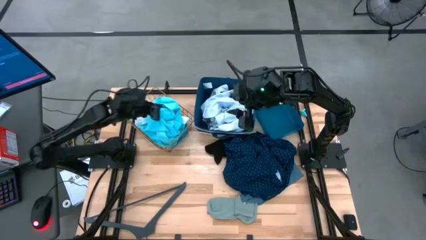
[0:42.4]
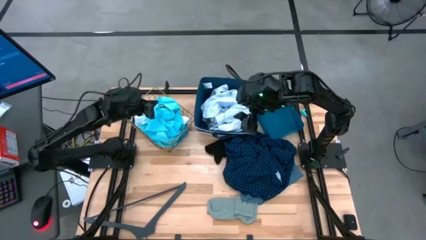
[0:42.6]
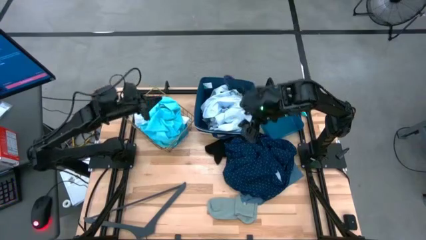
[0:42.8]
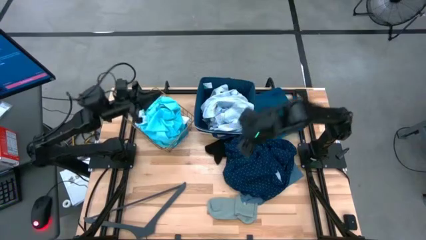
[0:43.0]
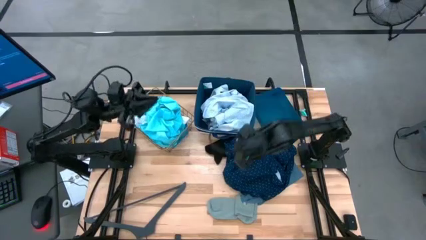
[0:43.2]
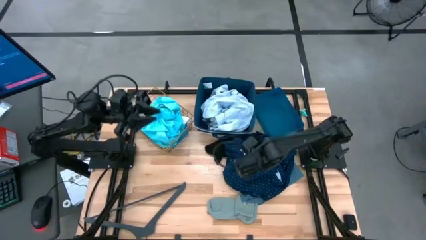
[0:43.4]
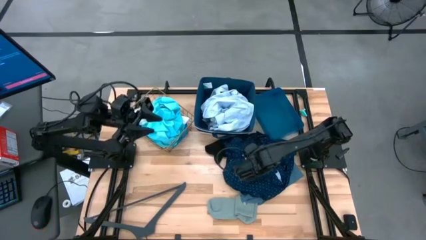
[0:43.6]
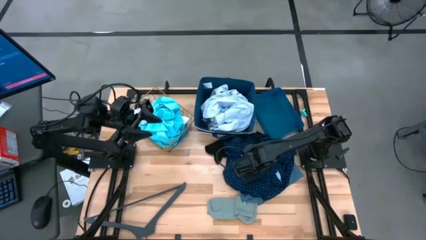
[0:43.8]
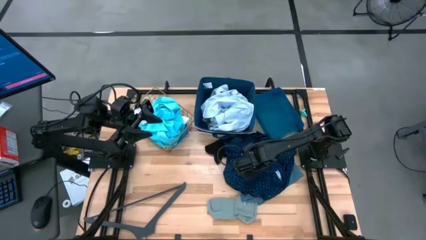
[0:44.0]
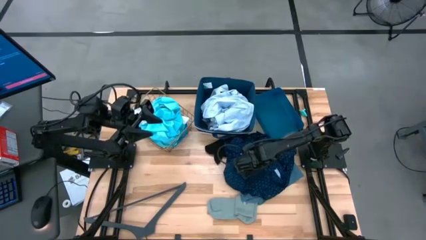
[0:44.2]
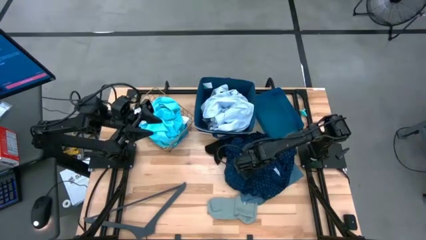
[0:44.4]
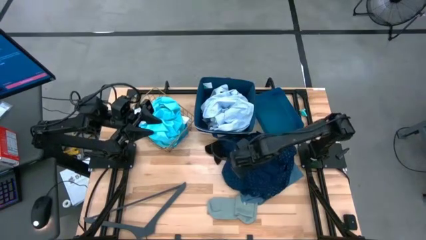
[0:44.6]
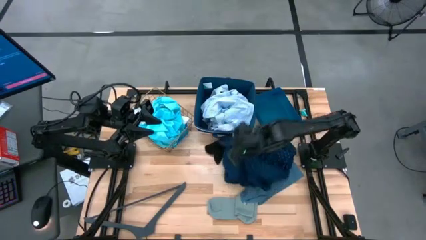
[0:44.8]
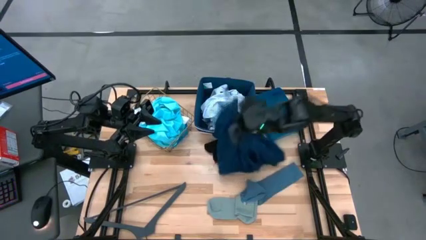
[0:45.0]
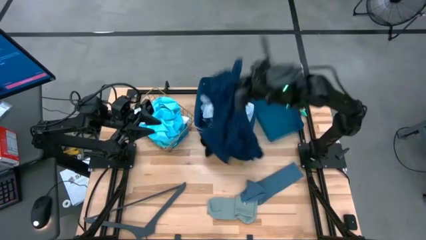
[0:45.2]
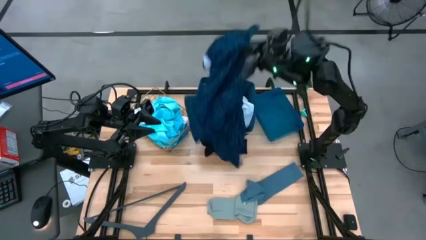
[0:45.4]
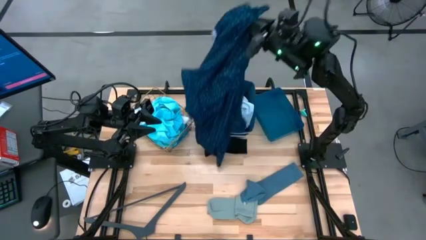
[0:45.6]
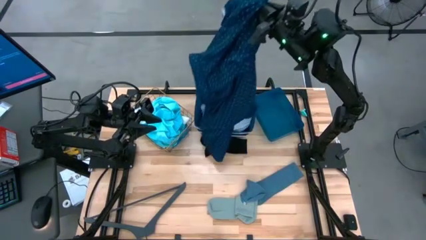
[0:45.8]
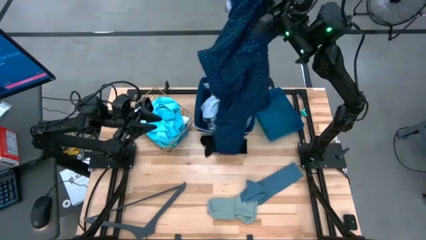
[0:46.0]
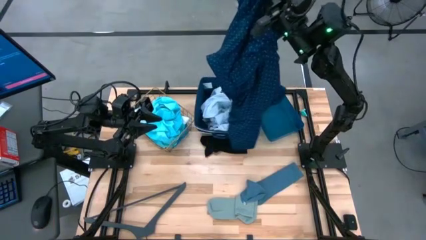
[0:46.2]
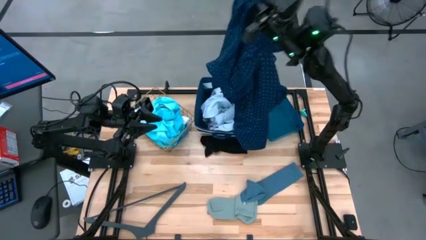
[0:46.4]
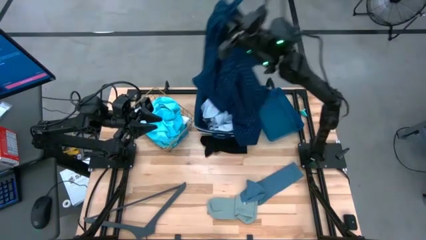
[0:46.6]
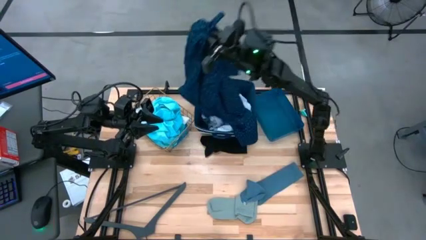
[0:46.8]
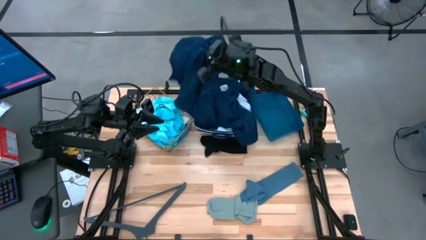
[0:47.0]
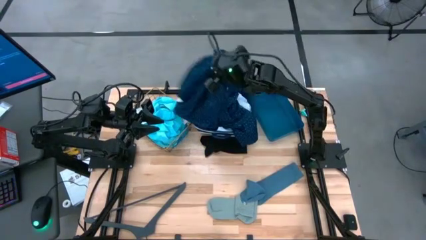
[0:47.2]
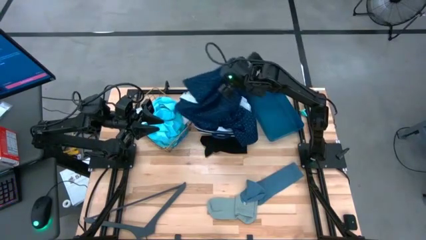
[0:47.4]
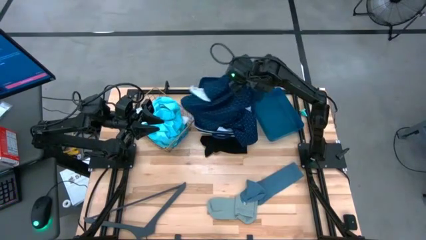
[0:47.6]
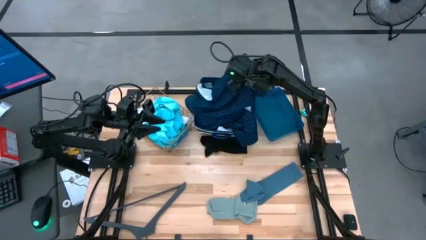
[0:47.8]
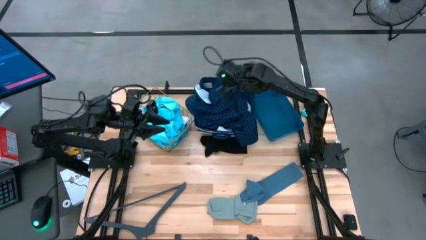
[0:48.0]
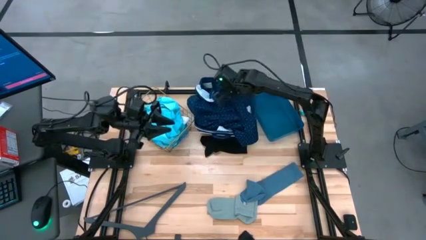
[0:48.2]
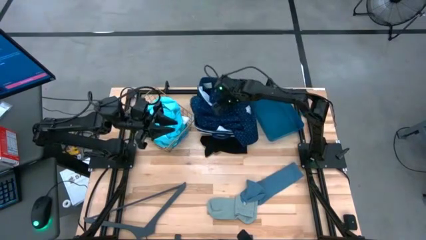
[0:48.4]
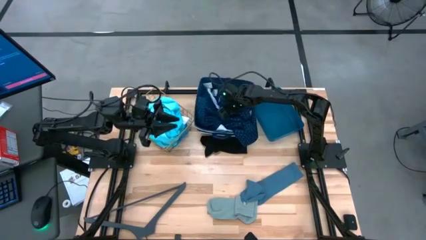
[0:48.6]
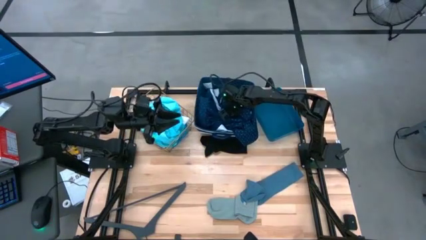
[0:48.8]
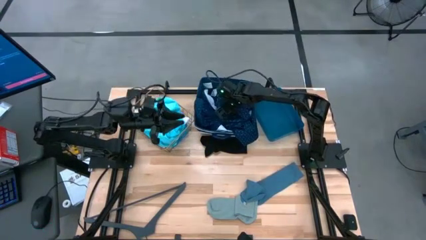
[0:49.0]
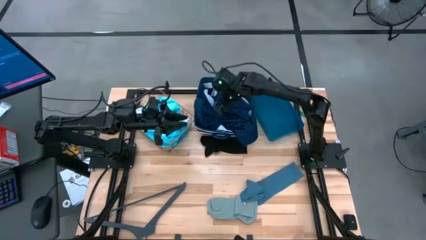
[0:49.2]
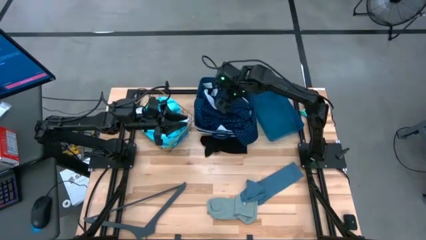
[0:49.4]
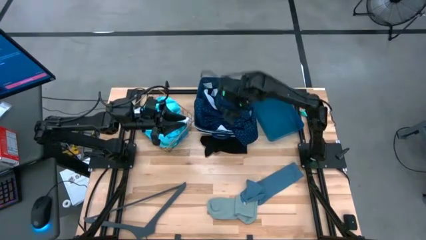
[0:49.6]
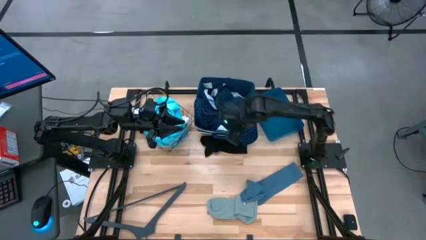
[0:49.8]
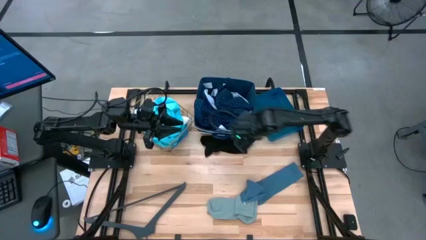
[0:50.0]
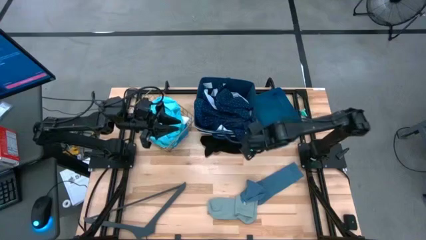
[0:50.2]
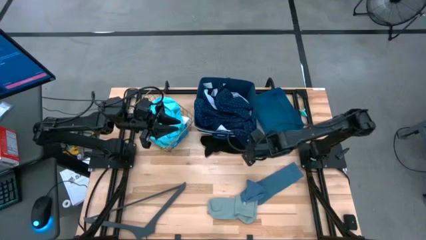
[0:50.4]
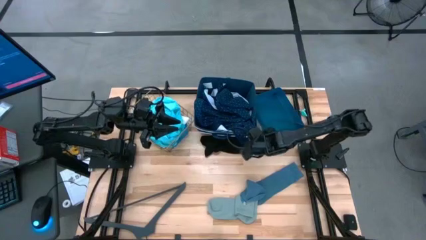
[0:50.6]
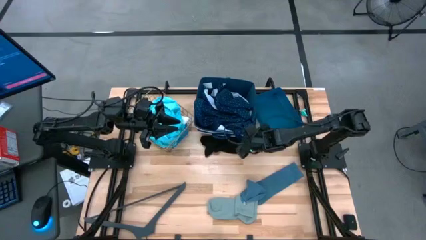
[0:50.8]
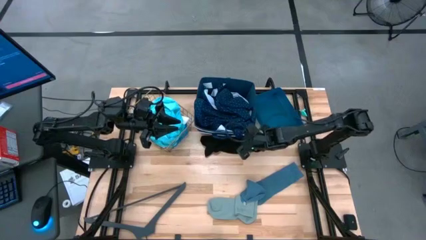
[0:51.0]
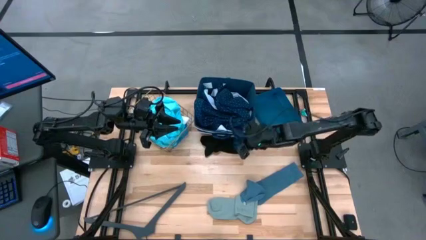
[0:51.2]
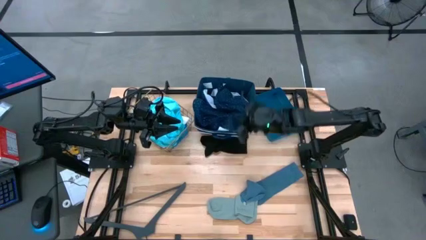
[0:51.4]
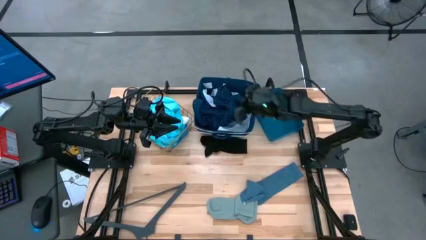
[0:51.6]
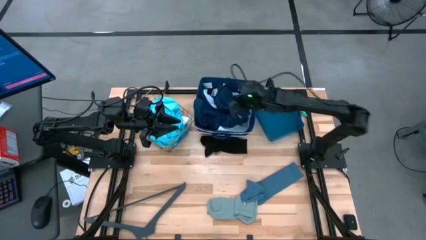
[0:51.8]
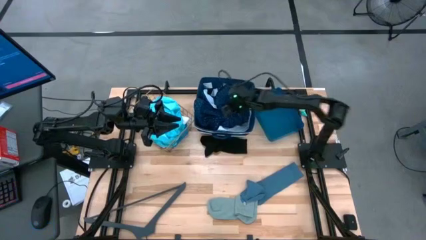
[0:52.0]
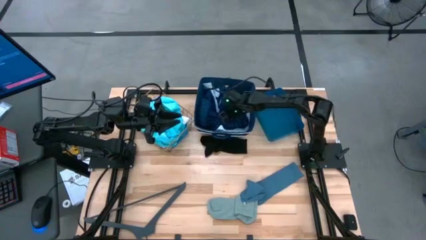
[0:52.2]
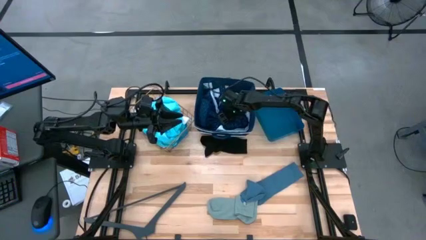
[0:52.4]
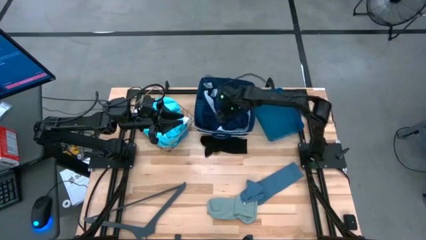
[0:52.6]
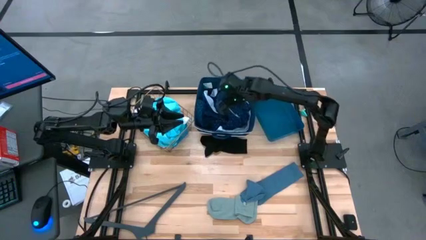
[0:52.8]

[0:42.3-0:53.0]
Task: Pick & Place Cloths
Put the blue polo shirt into the blue laundry bin

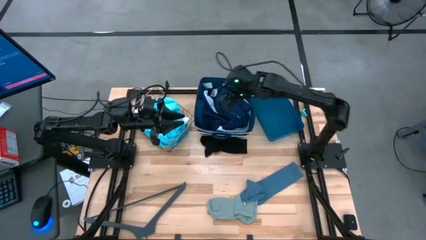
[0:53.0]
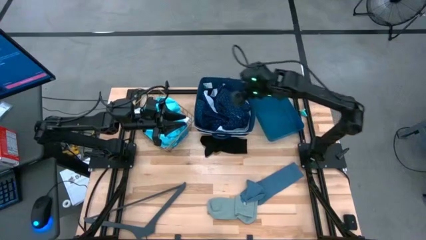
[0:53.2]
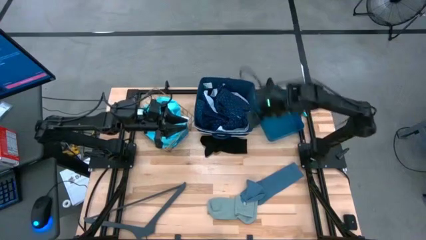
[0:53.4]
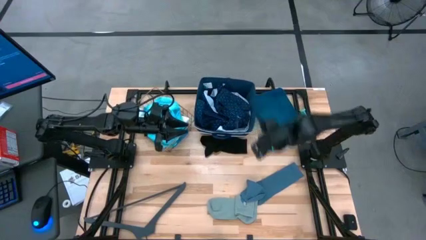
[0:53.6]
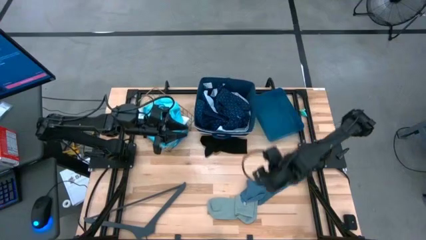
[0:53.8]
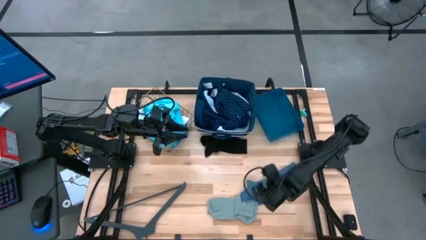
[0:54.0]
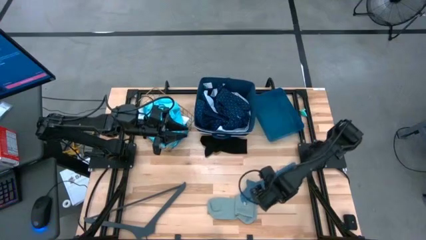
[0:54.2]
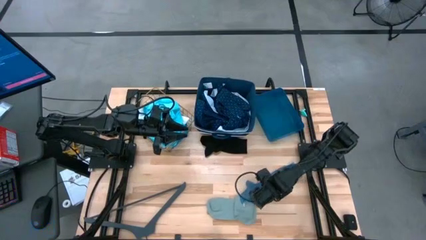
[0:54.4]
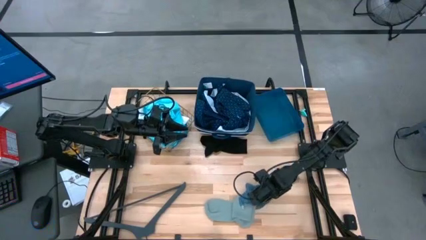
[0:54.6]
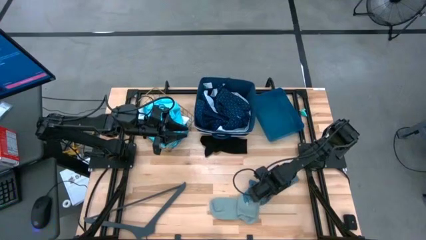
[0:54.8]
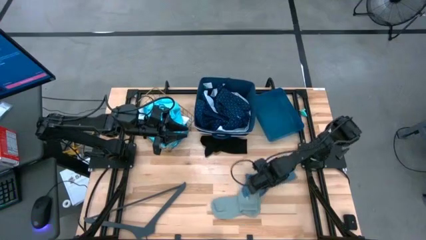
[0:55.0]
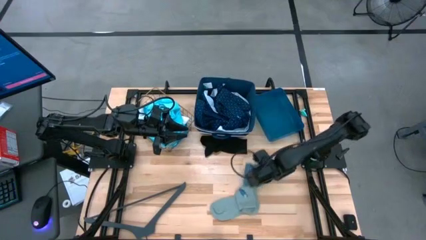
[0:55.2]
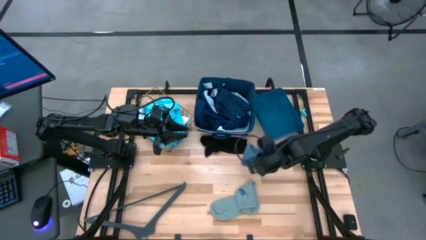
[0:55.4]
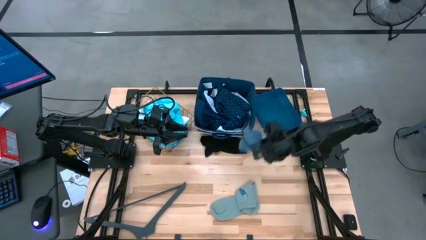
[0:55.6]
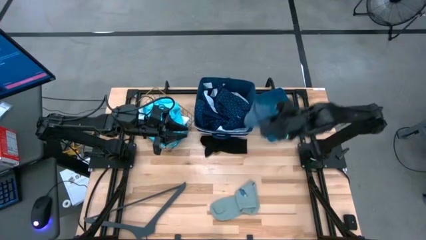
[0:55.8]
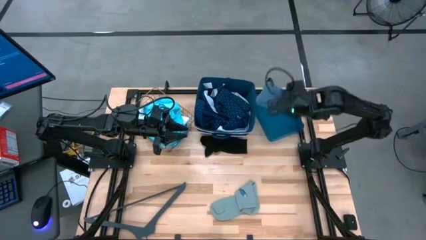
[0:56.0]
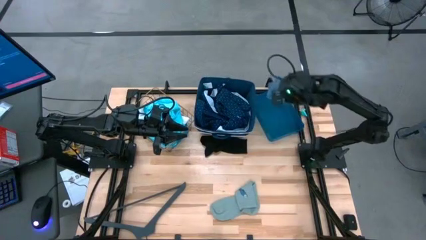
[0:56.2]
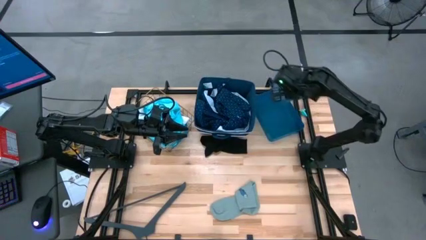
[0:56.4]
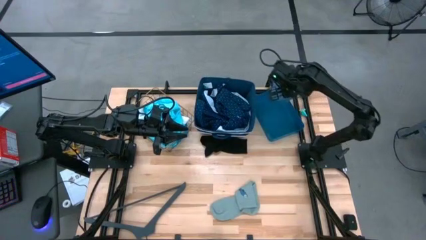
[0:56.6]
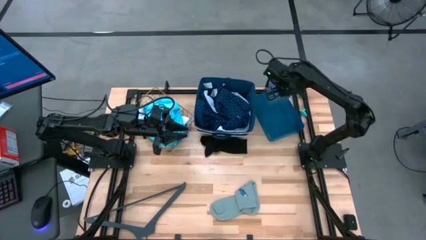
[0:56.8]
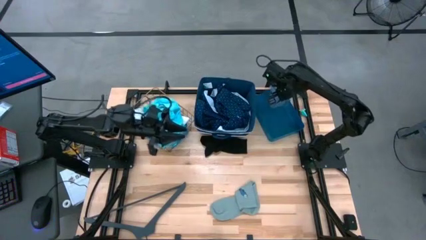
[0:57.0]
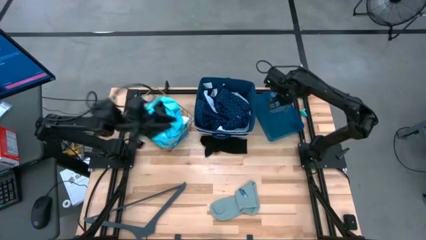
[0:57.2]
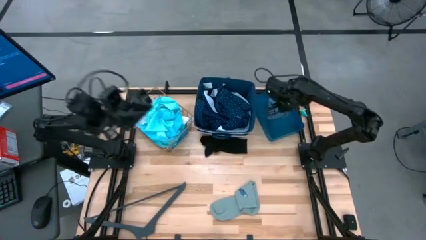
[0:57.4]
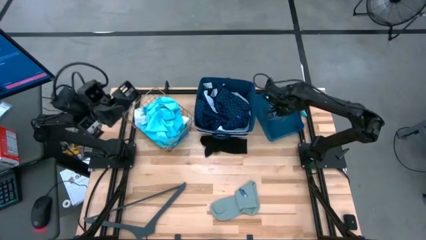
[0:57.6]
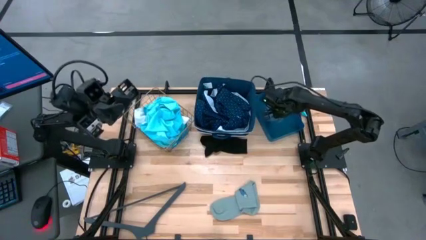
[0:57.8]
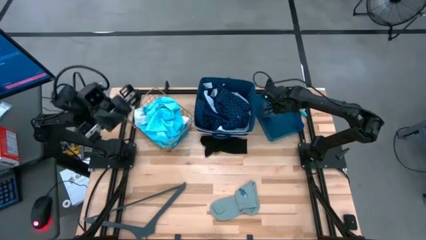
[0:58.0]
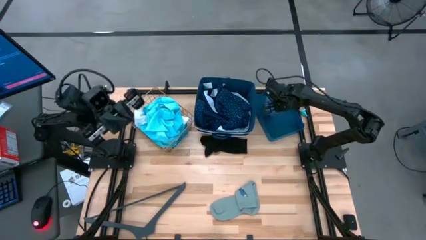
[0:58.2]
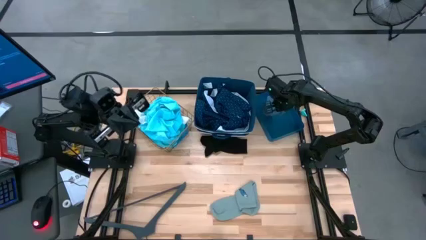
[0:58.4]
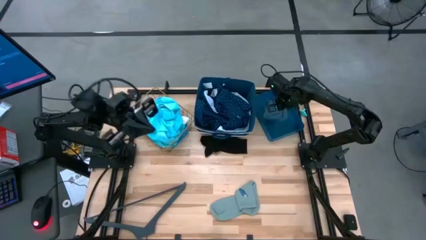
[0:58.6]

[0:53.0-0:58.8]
Put the blue sock into the blue bin

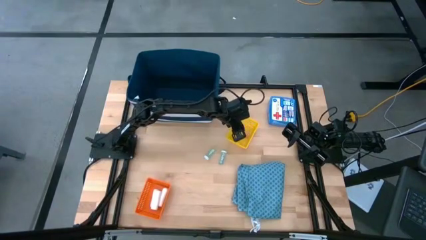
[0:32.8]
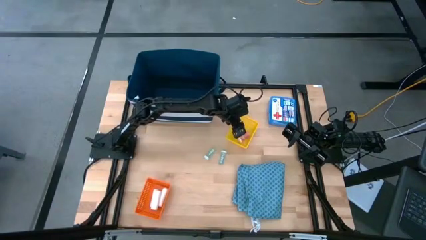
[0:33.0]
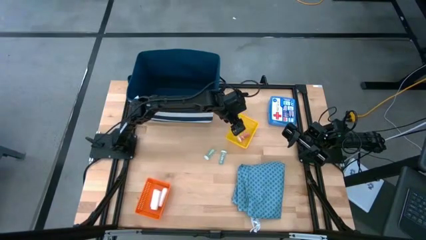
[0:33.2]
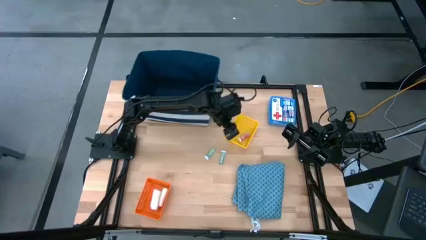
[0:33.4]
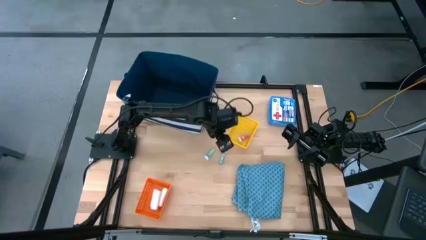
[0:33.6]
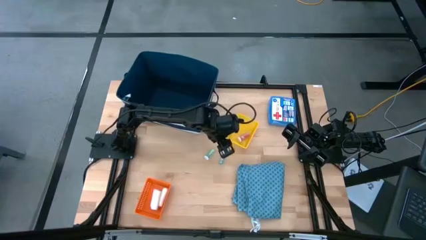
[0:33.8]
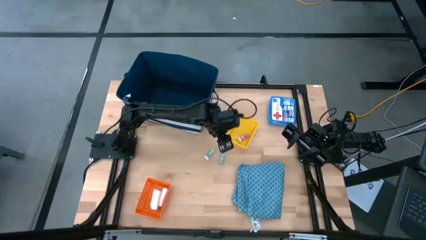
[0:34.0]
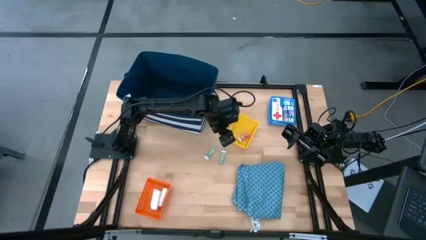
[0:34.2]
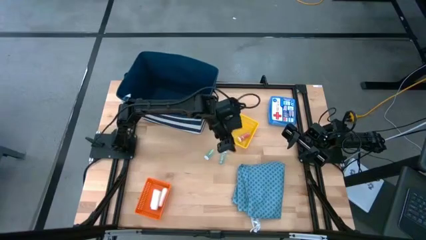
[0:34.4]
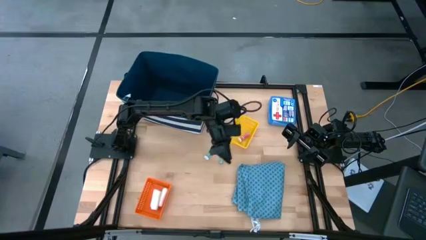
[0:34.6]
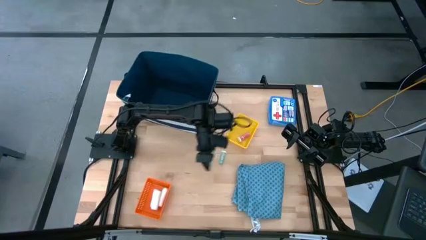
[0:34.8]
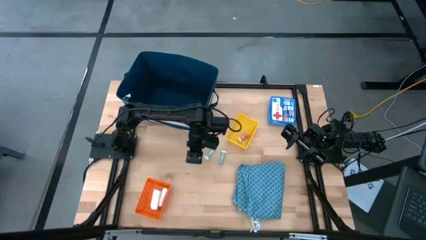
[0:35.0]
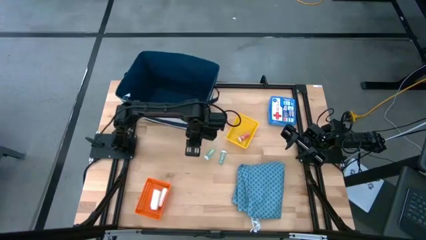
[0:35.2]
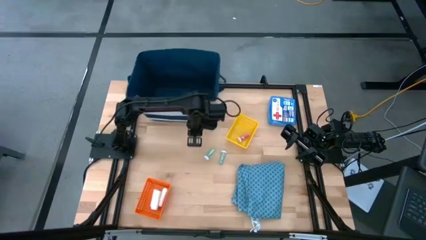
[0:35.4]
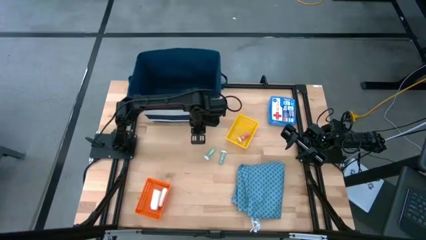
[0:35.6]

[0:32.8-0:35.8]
Task: Pick & place medical supplies in basket/bin
Adjust the storage bin
